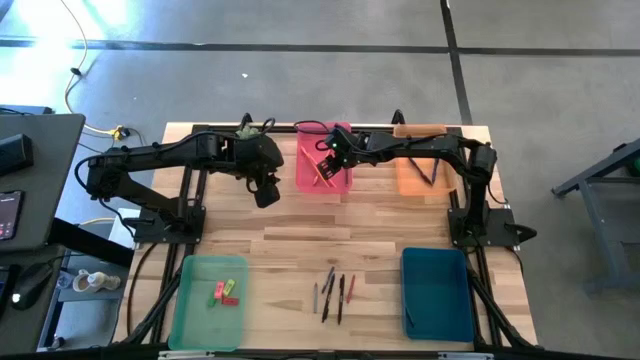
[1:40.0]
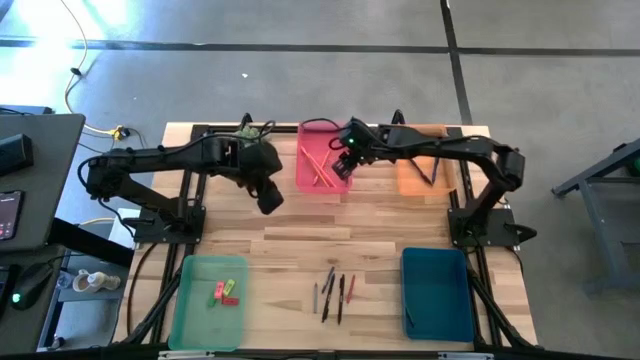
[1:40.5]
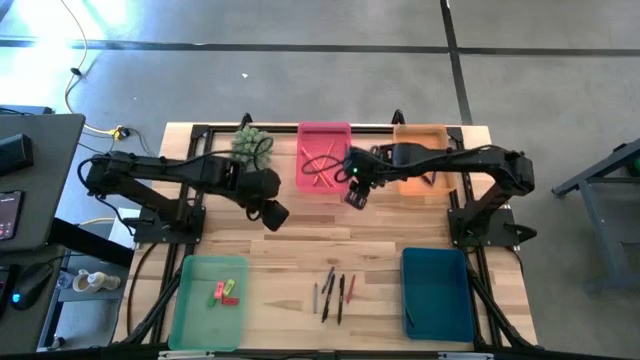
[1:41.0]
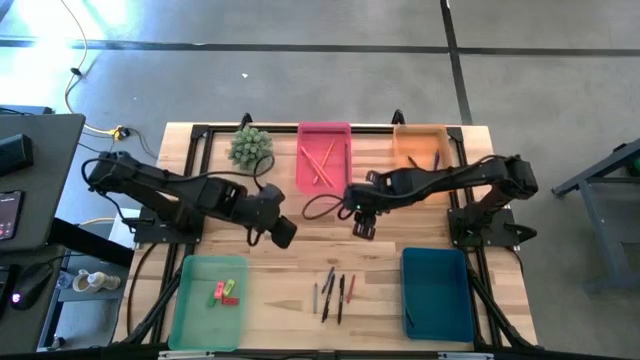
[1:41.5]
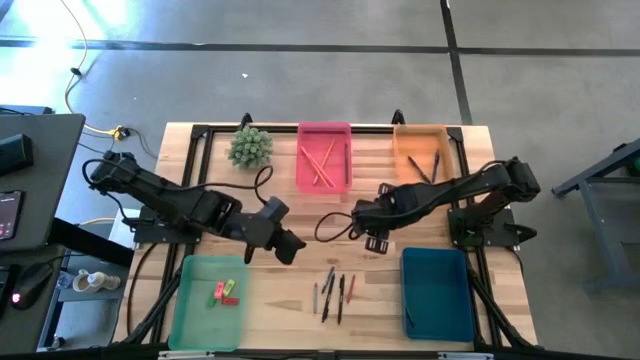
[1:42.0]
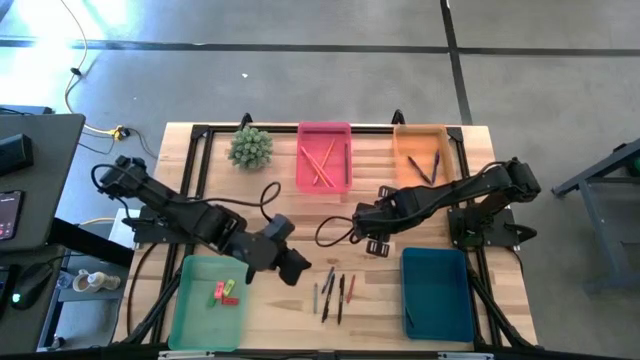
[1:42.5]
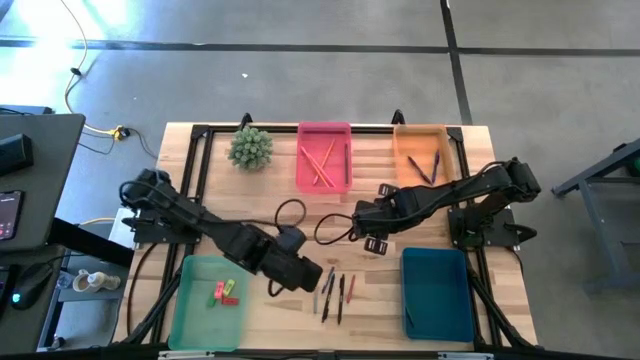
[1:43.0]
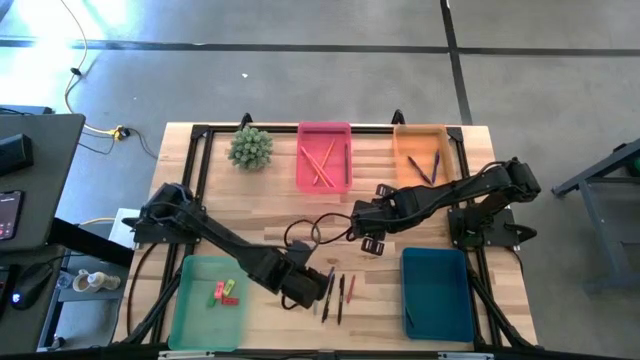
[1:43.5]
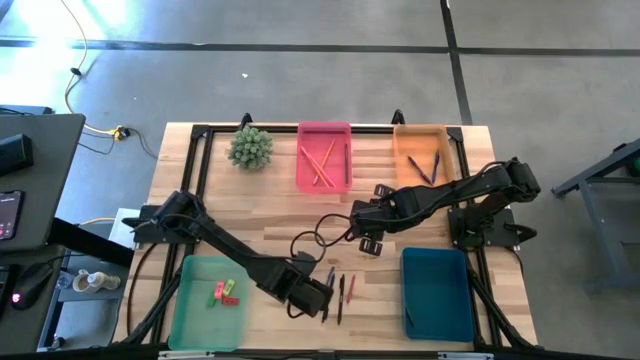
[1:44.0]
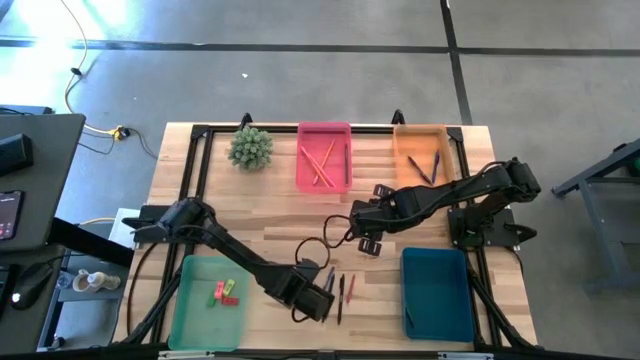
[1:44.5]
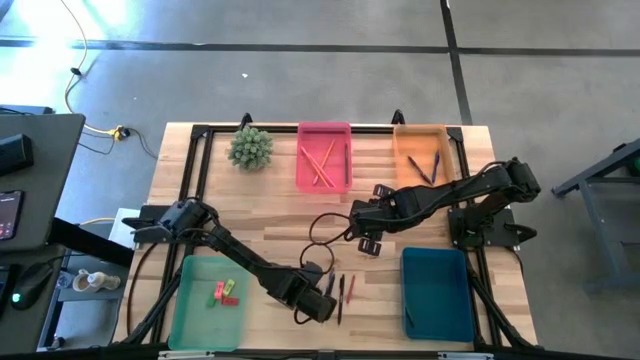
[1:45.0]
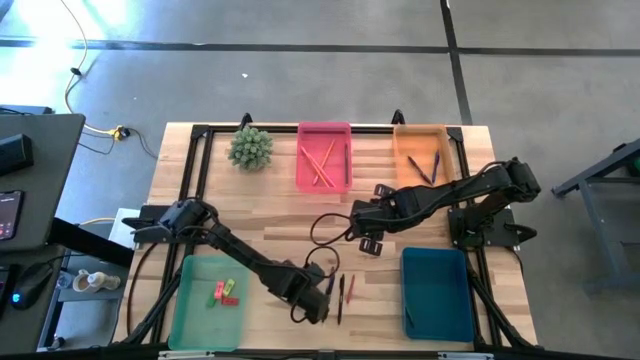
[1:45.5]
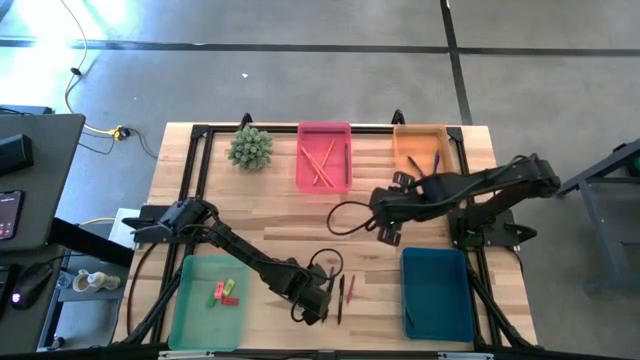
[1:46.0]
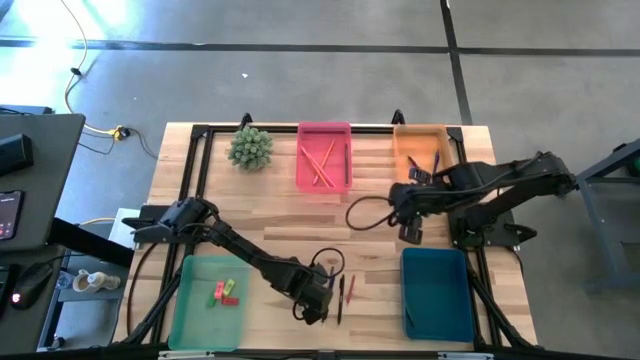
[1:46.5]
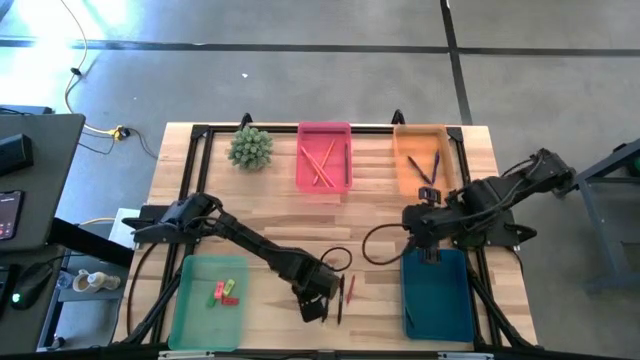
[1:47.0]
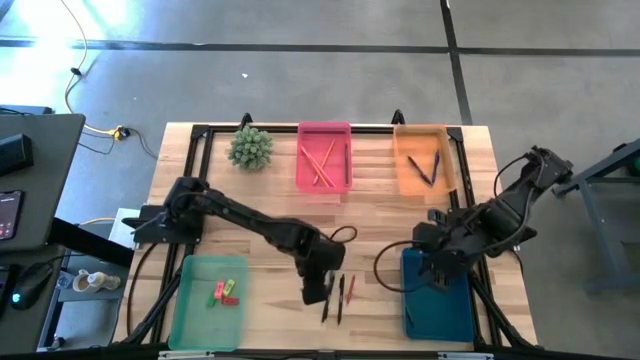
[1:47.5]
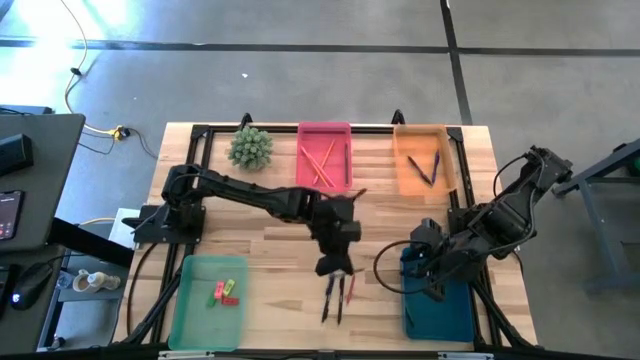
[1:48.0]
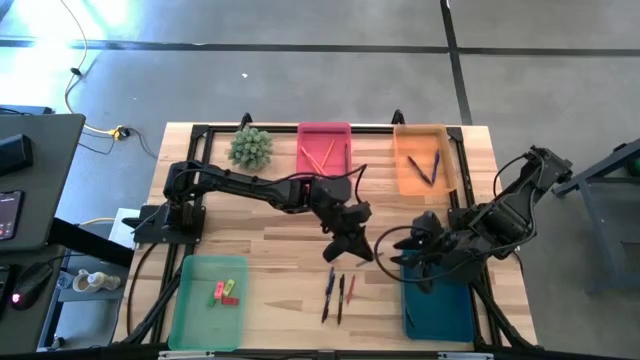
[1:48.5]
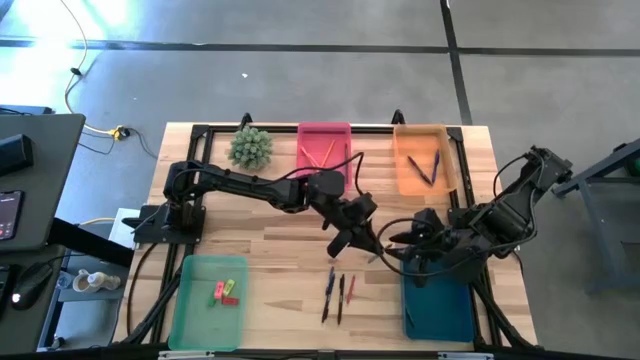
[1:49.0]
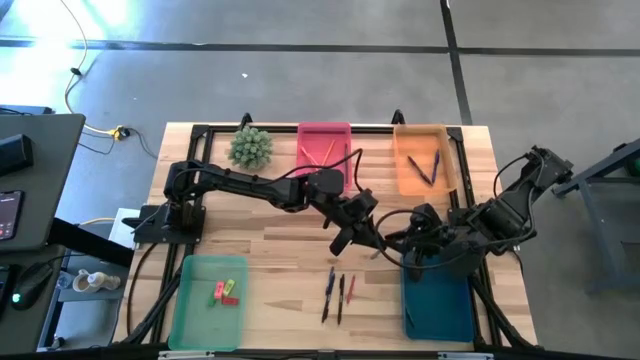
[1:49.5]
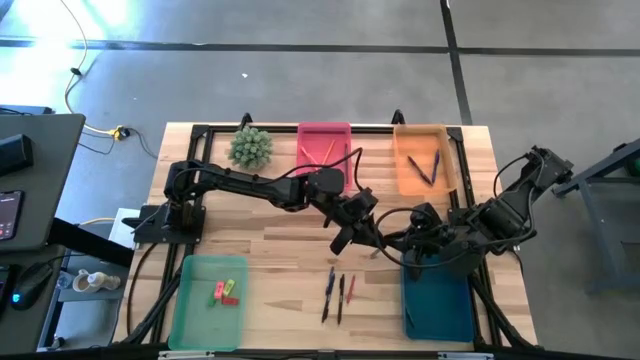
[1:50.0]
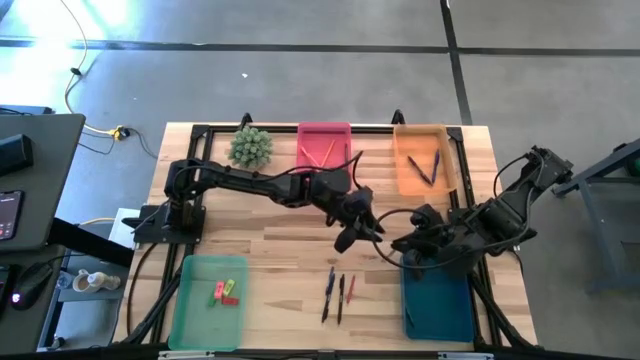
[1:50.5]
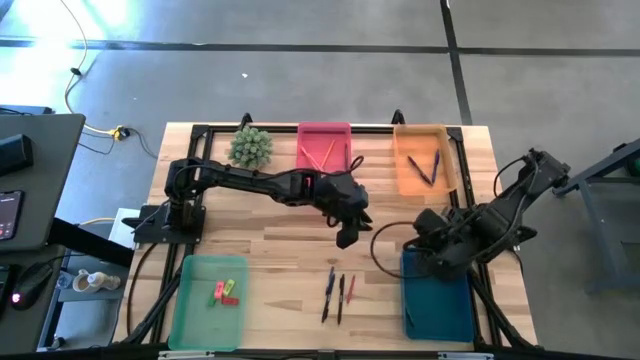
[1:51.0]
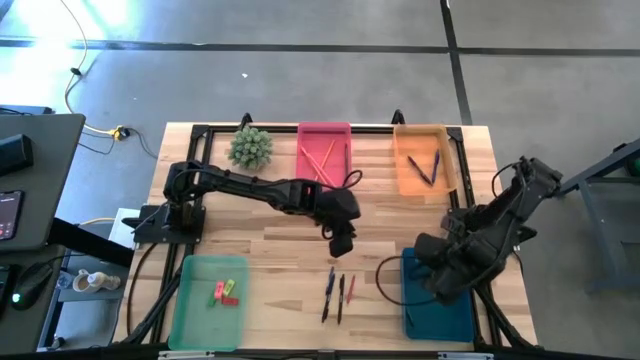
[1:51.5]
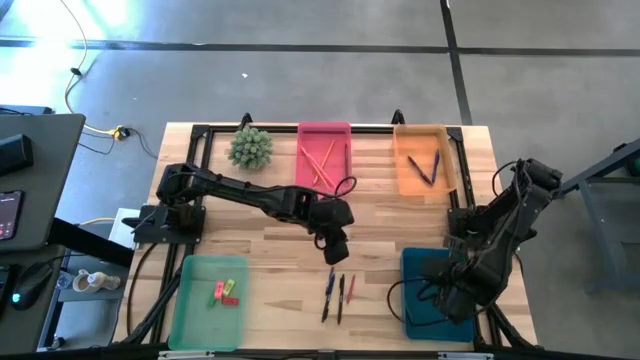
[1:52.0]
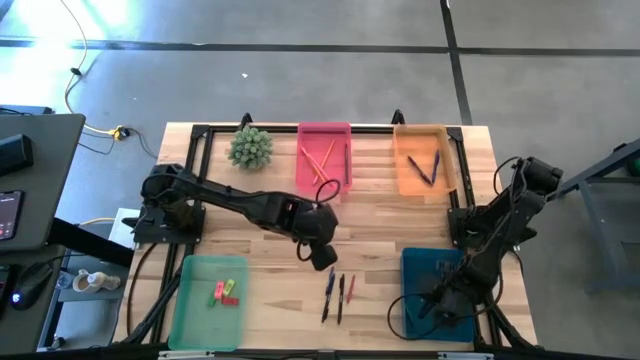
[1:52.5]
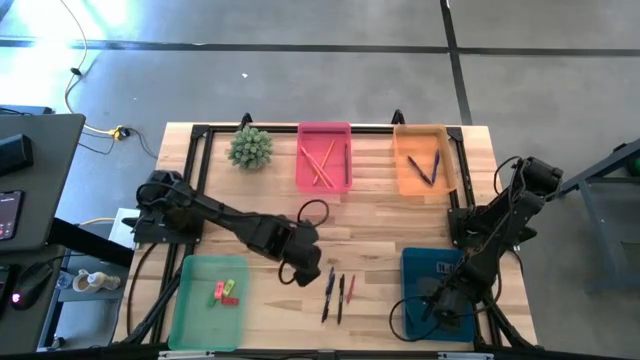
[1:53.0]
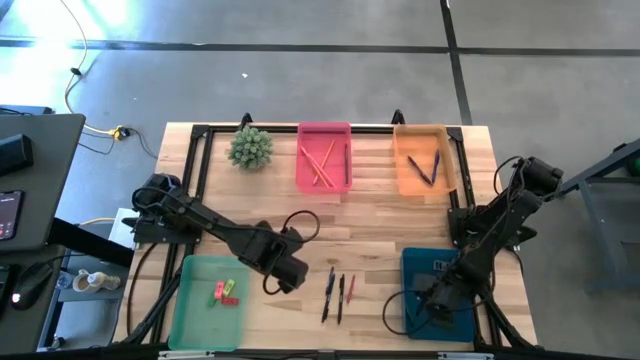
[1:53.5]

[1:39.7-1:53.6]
Task: Sort crayons/erasers/pens/pencils in bins
Put the gray crayon into the blue bin

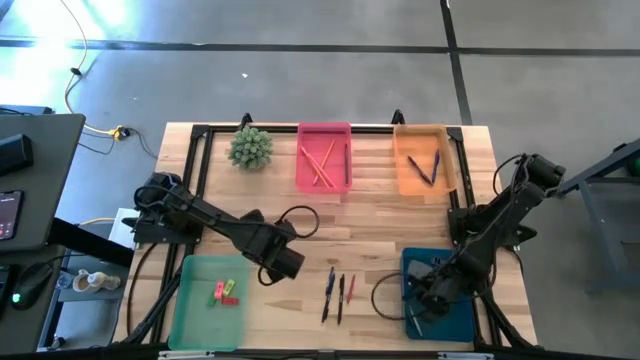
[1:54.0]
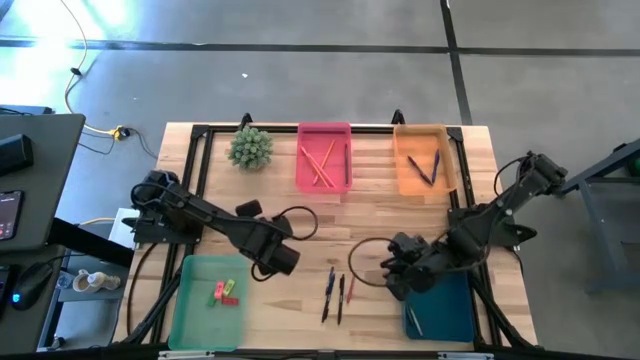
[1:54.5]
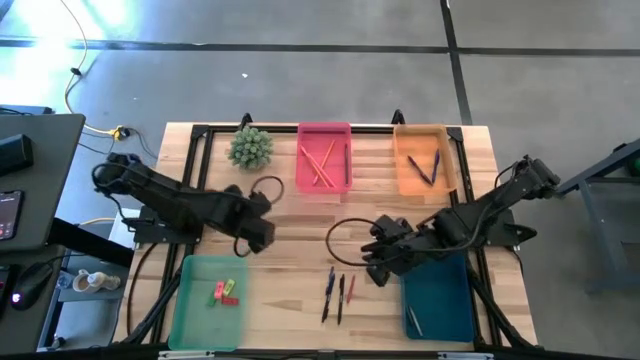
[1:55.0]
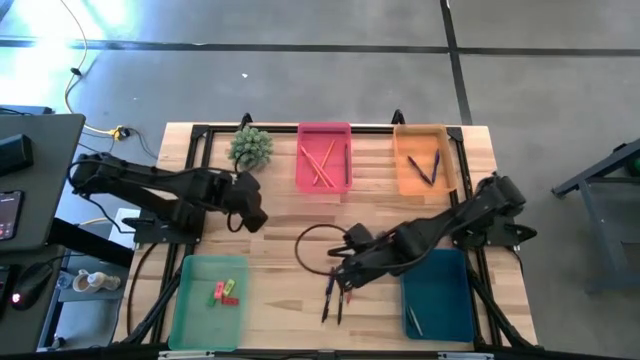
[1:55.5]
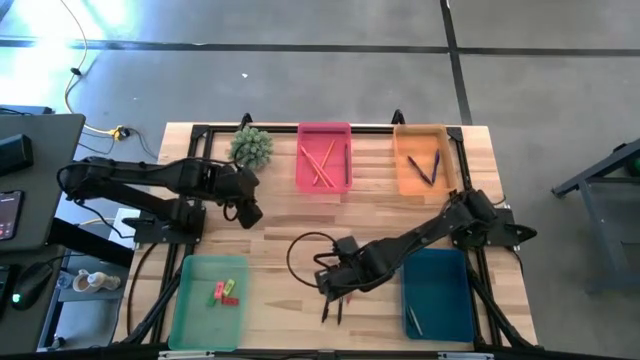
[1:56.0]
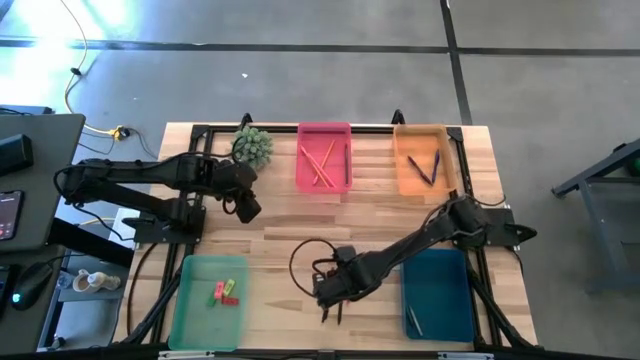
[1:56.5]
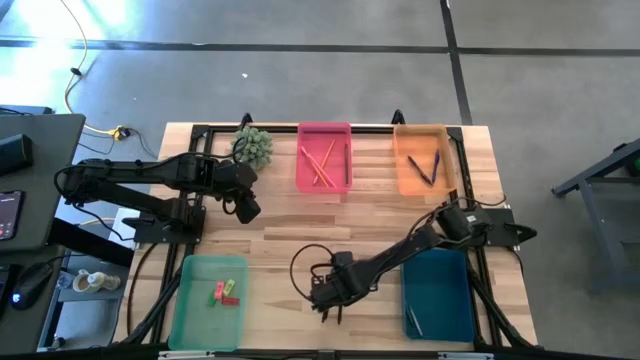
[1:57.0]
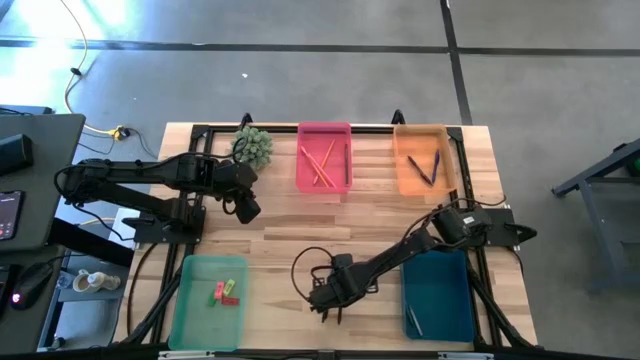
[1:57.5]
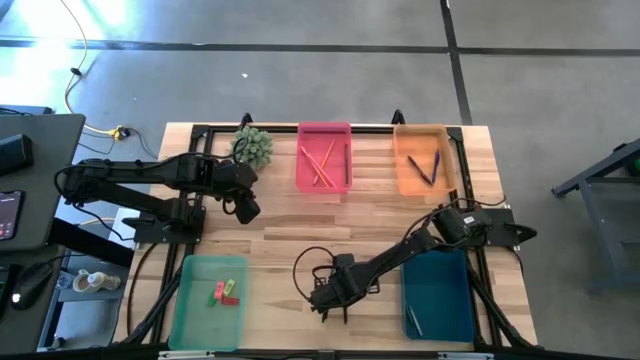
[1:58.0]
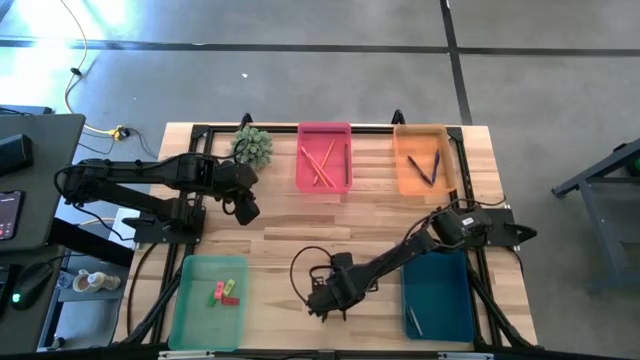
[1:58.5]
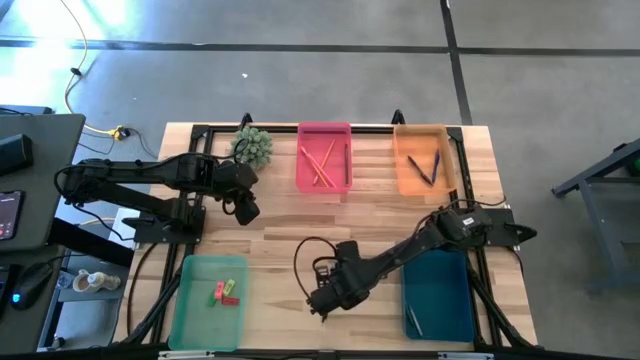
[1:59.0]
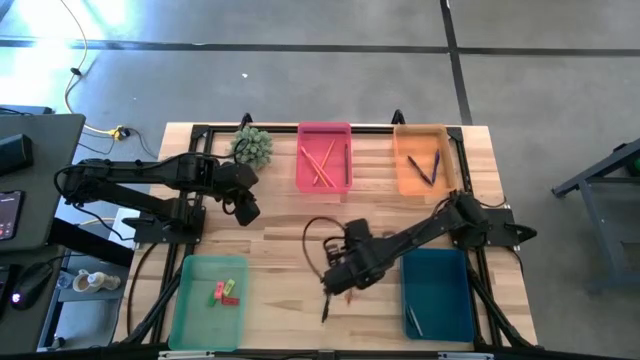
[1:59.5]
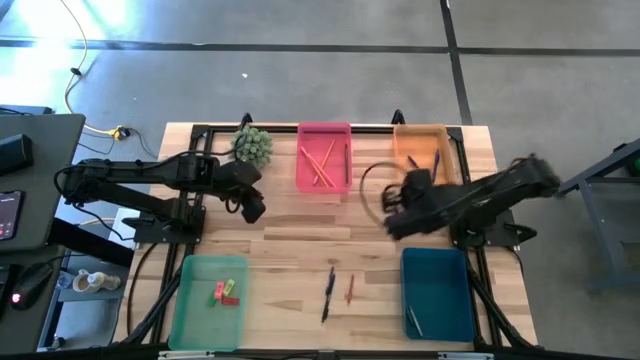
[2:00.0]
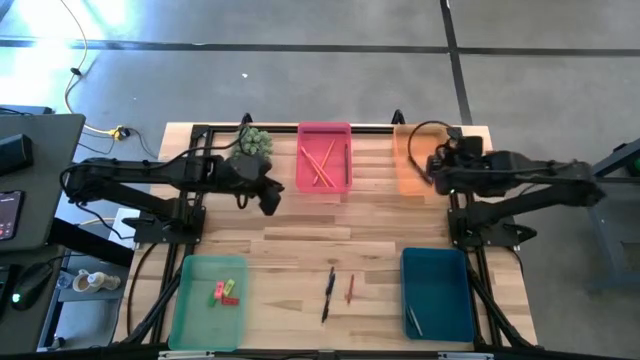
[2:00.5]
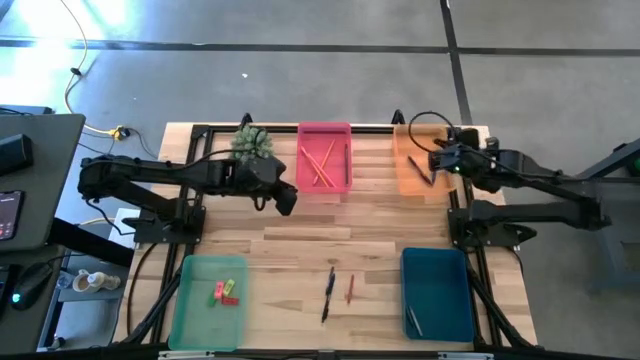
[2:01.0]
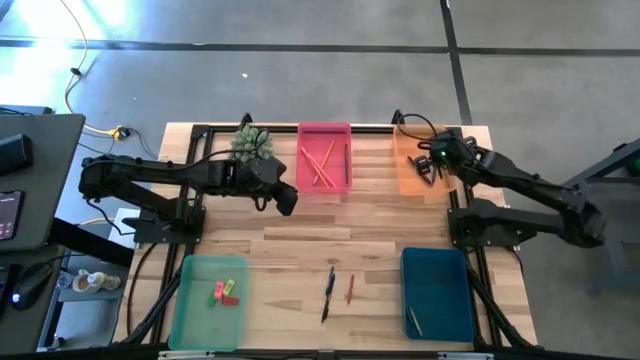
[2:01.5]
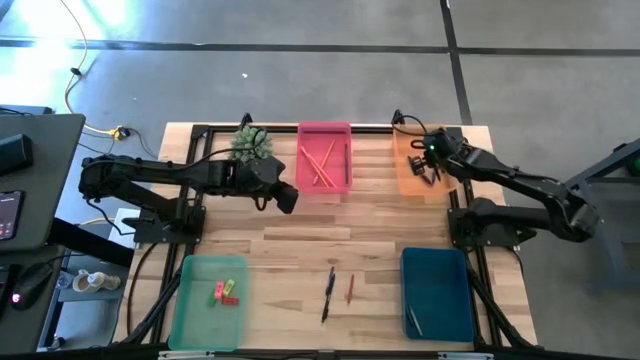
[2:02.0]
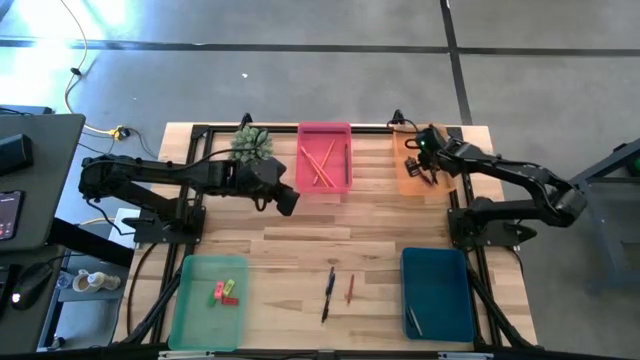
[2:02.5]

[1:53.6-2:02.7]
Put the right black pen into the orange bin
